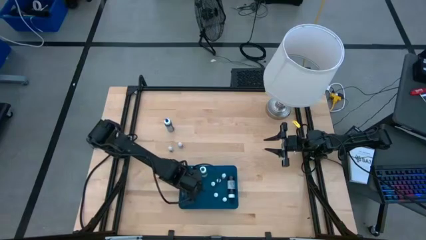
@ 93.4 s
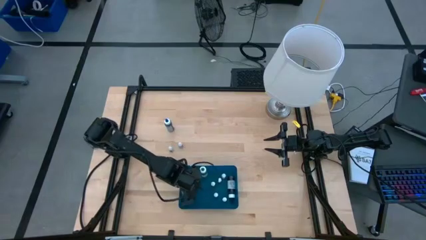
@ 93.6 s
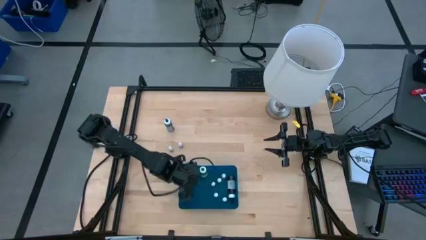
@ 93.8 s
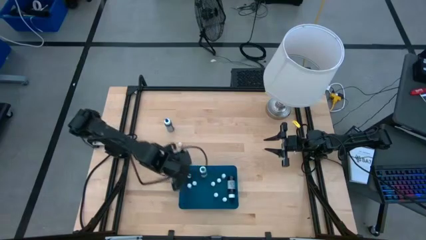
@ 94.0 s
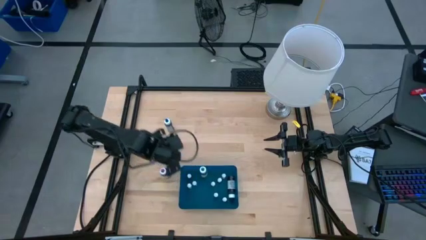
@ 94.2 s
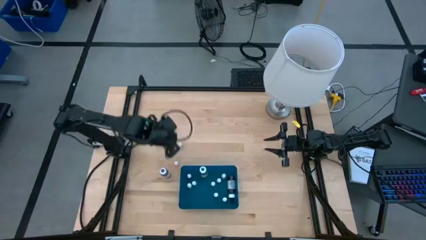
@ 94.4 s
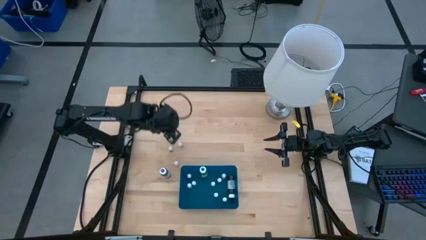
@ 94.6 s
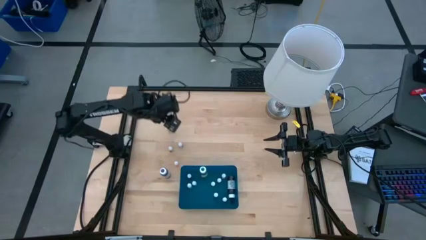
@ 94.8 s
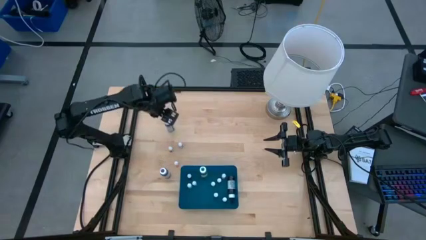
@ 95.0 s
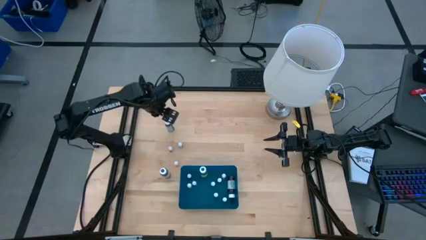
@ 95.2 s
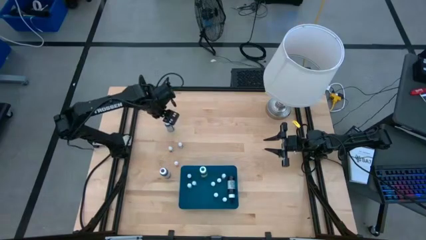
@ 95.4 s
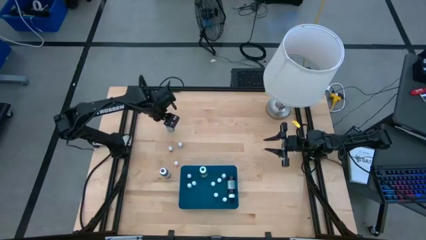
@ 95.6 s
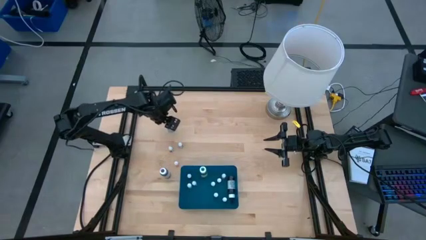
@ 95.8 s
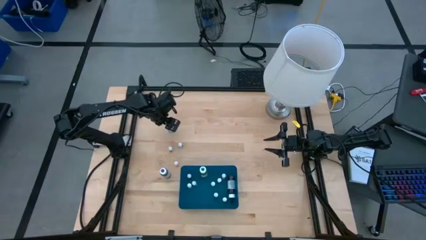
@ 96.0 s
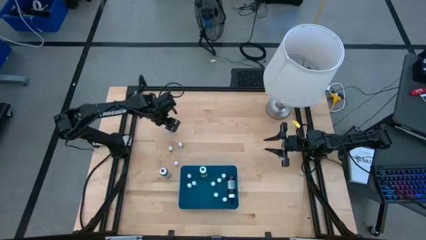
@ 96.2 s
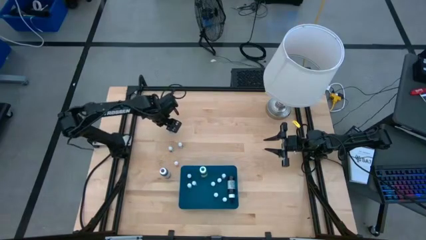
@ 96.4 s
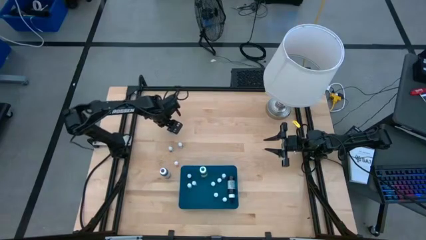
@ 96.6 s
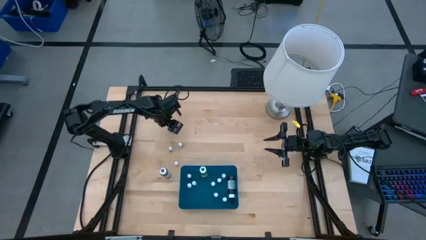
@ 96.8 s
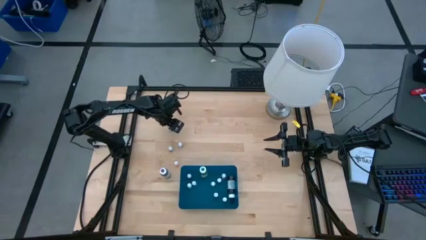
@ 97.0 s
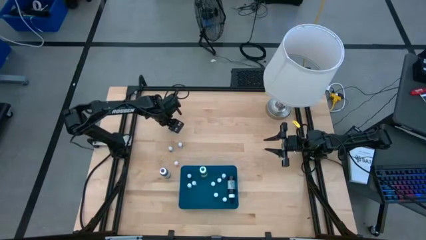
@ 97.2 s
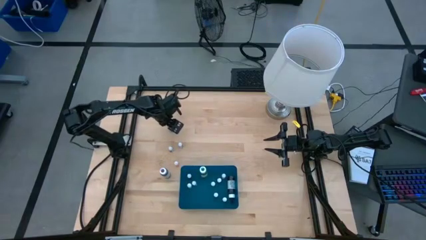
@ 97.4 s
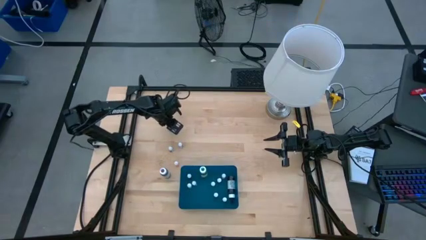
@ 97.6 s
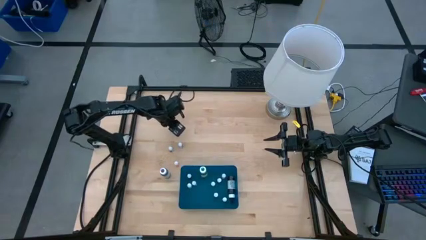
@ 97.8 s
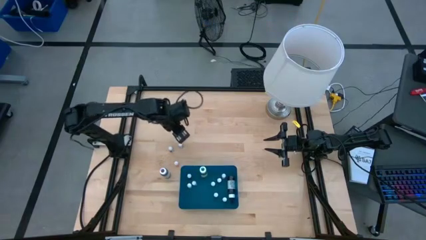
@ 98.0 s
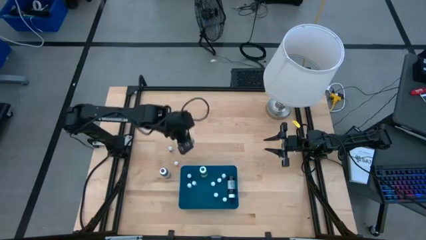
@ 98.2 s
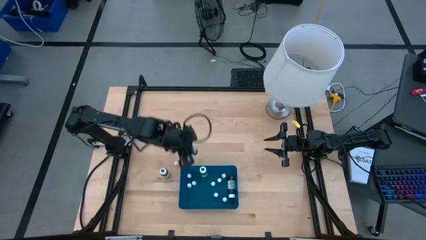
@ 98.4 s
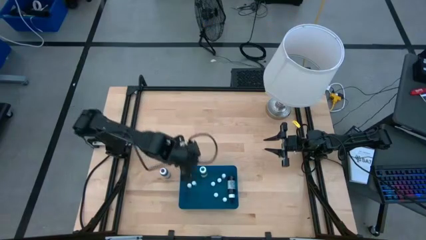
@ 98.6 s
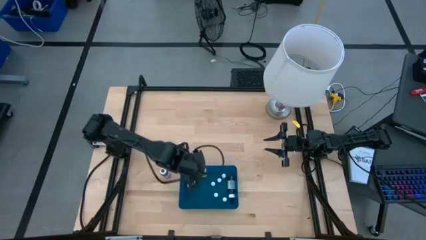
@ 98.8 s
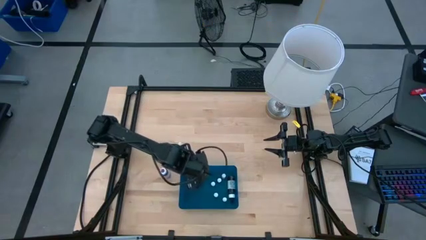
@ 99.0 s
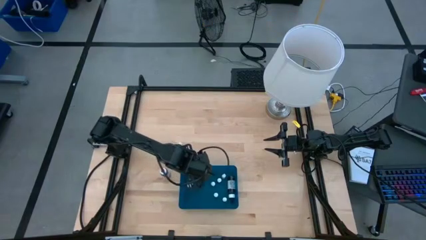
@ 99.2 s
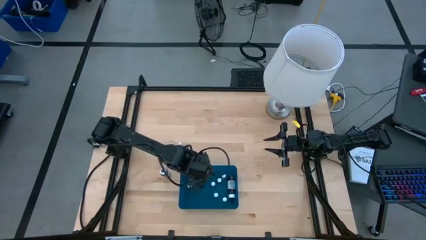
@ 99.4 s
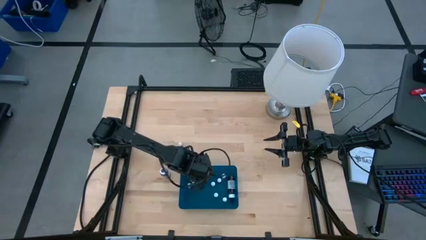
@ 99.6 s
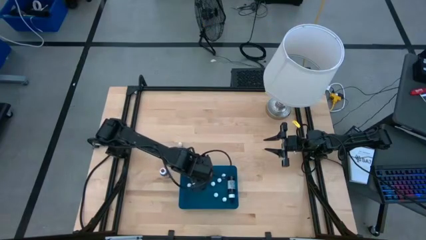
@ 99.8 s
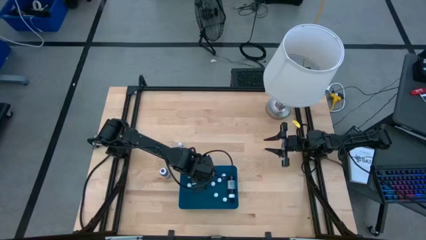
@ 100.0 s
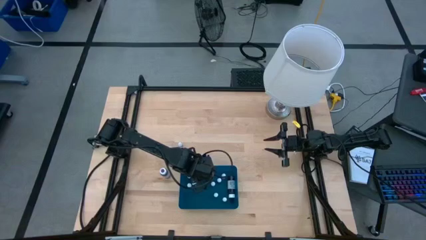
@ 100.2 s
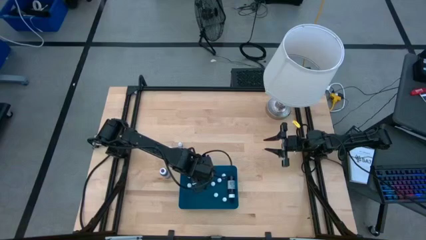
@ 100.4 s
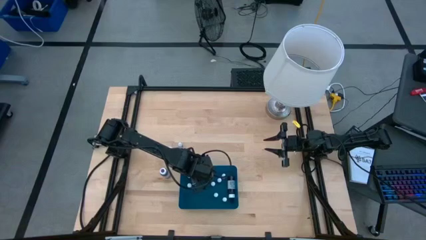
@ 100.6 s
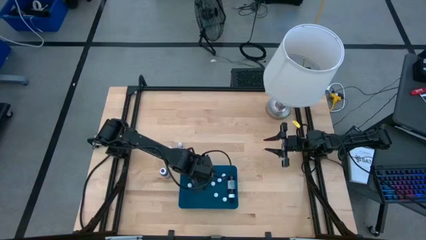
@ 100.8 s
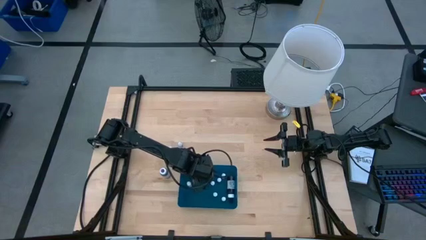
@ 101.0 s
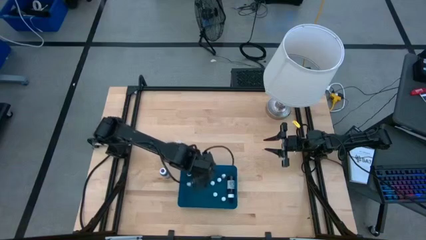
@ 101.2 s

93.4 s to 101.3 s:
Task: Pick & Place food coloring
Put the large blue food coloring bottle into the blue container

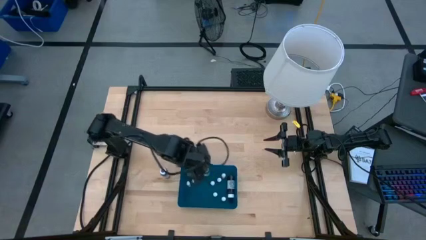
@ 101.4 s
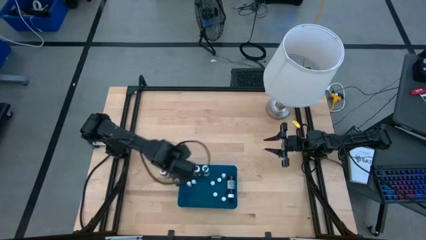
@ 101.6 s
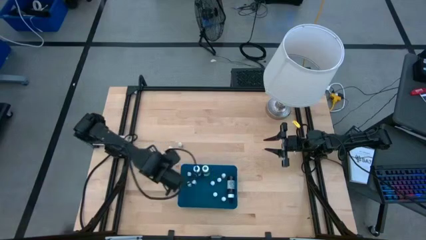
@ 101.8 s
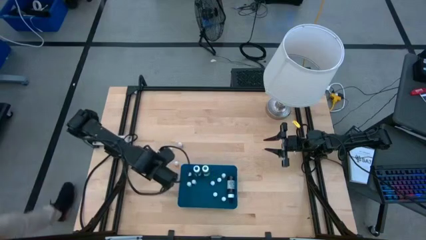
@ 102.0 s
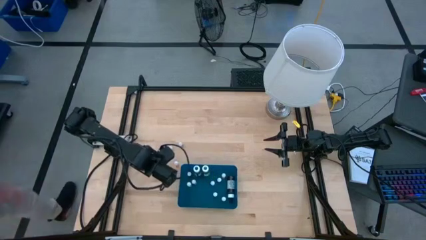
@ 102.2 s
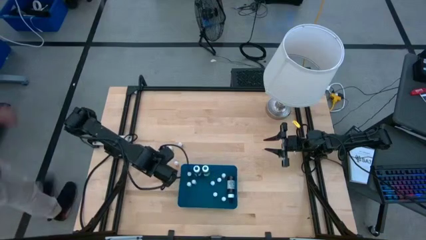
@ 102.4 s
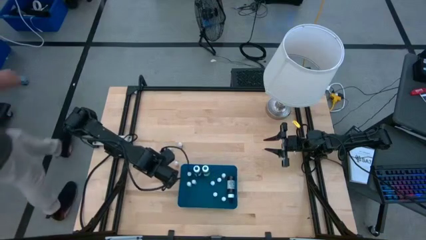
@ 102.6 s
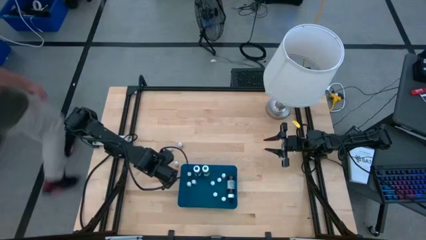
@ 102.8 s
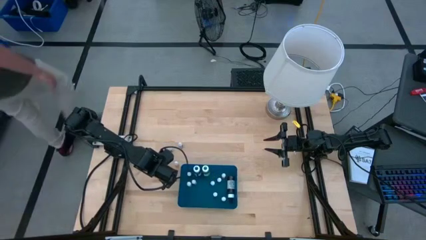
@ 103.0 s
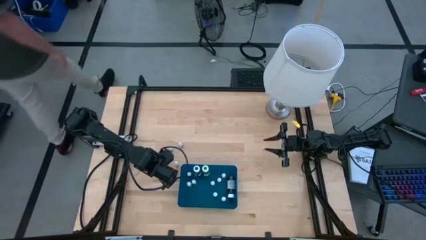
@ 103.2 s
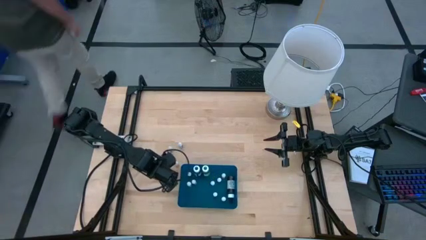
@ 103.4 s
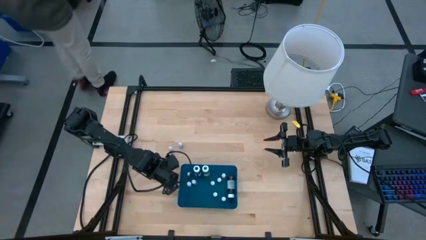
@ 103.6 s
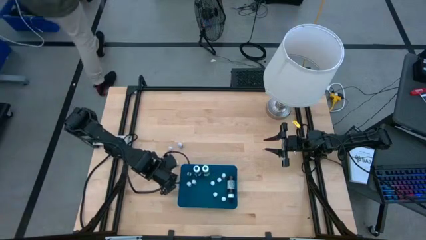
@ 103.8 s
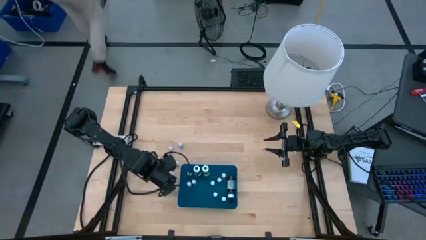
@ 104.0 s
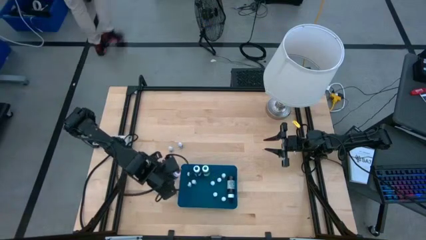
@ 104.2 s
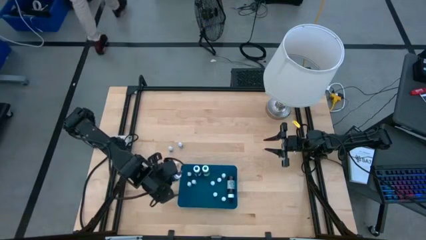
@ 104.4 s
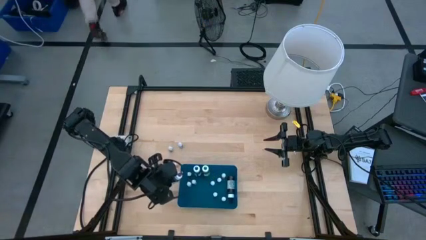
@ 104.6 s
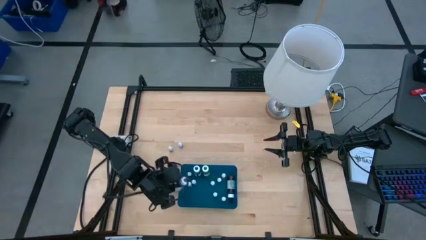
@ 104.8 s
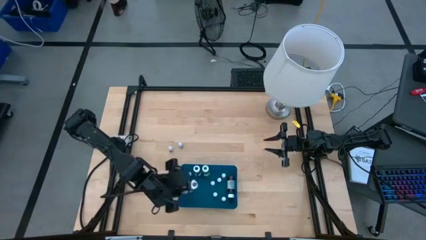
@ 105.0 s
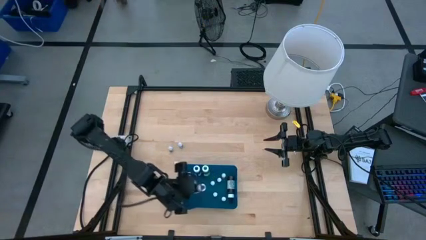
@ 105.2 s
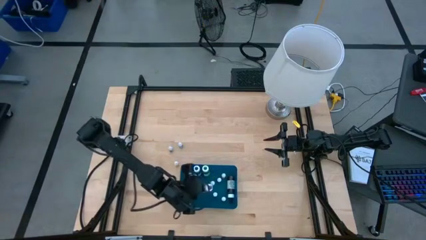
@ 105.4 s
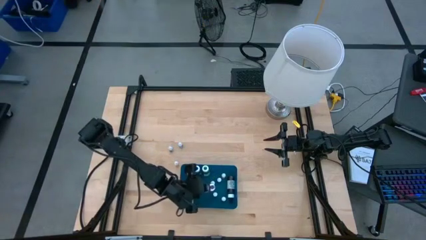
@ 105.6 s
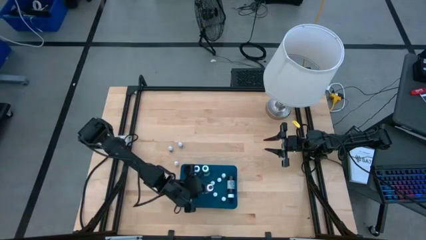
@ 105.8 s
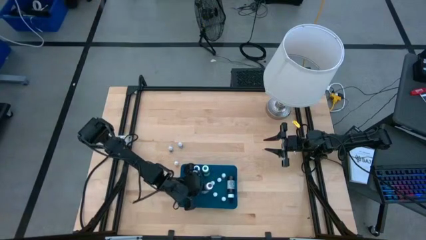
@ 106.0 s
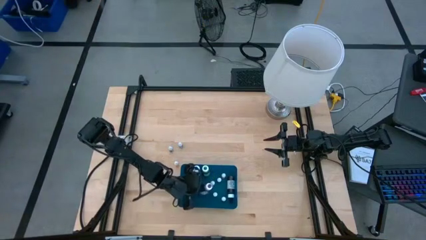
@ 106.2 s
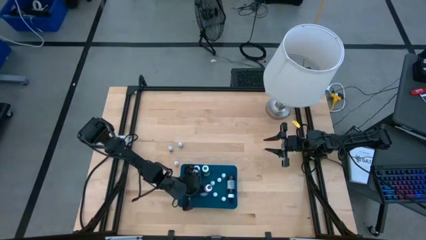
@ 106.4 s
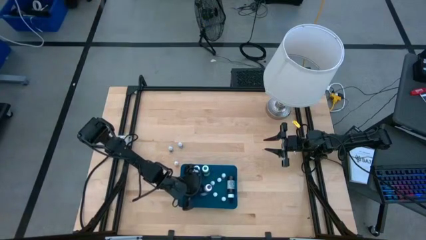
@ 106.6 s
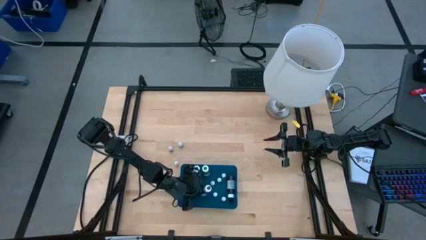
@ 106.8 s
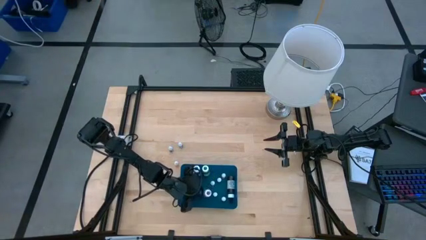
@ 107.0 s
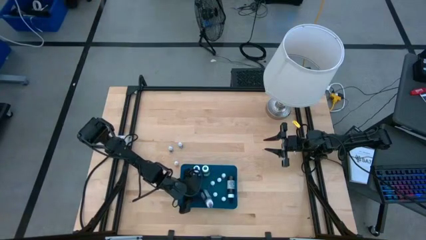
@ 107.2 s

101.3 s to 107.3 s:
Put the large purple food coloring bottle into the blue container

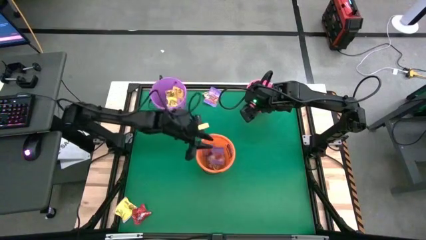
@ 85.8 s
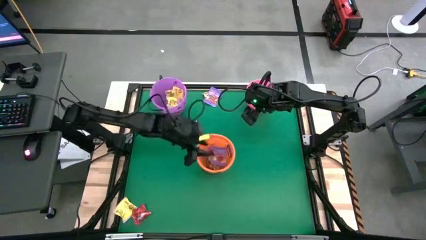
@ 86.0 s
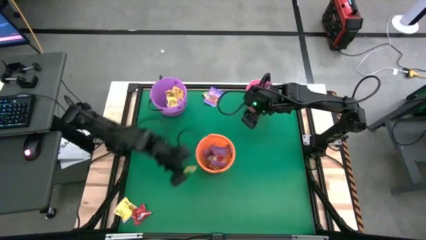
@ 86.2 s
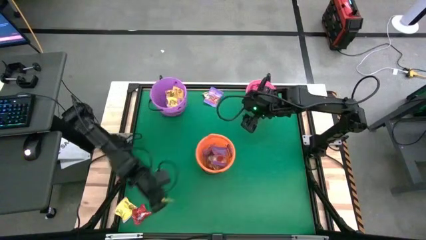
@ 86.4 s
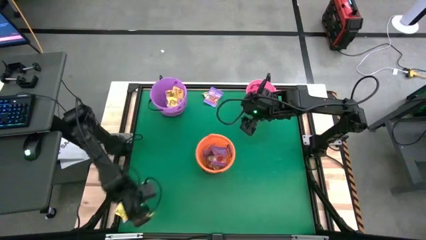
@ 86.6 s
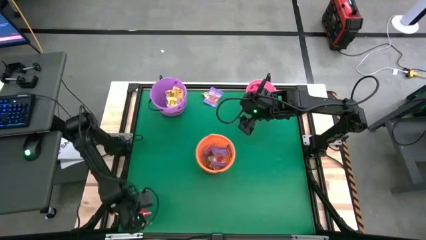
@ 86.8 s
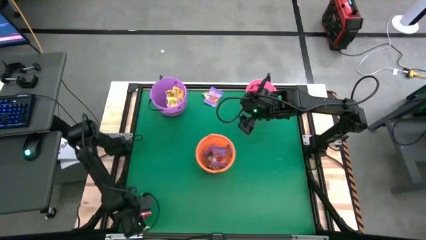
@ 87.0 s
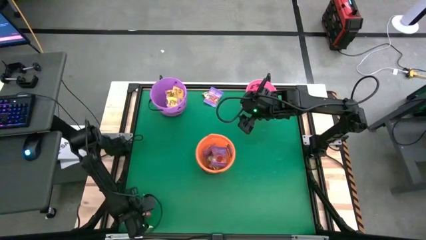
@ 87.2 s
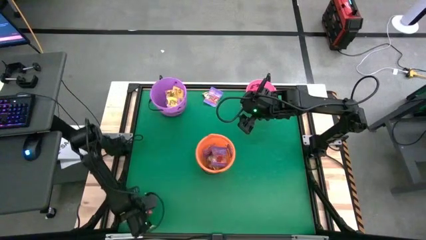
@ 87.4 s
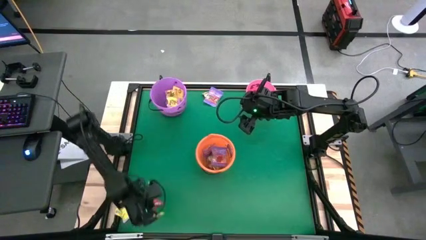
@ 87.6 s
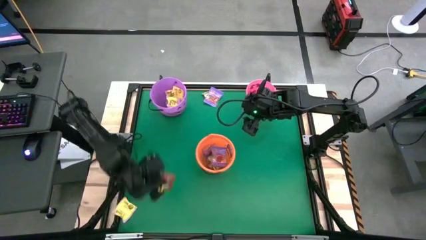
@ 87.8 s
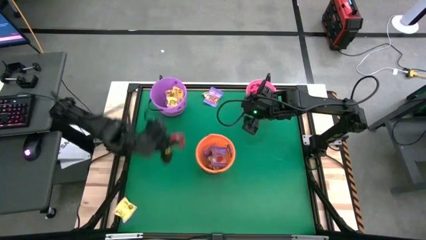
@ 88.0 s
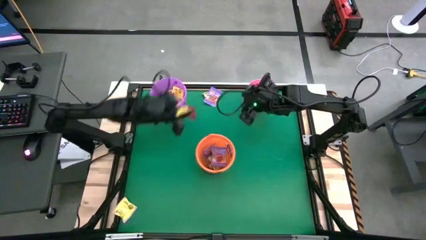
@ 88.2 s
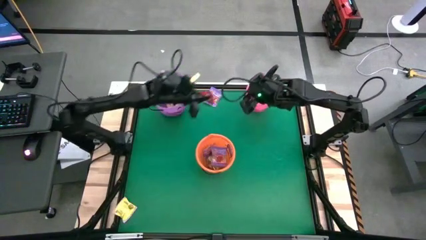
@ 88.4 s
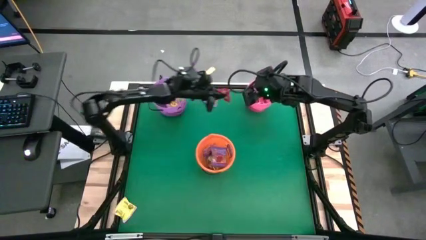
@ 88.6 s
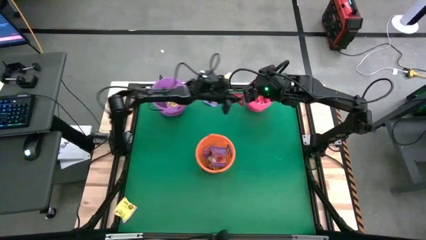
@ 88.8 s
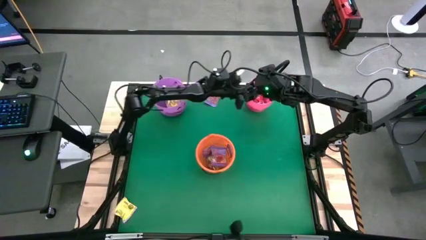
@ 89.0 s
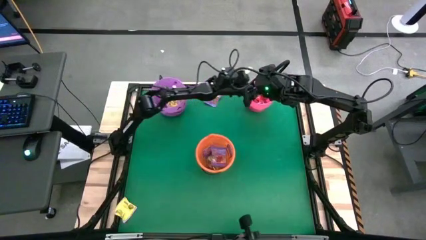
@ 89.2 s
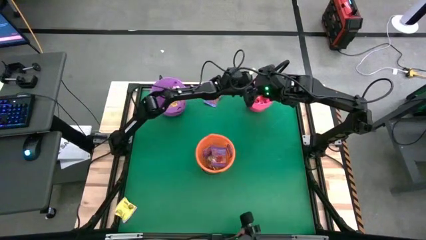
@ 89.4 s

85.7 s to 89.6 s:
Task: Sort candy by brand, put in halloween buckets
Put the red candy into the pink bucket
